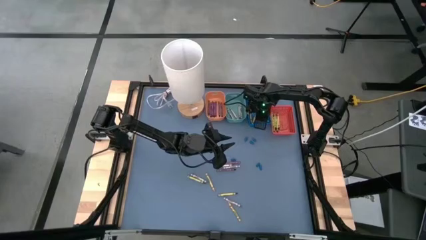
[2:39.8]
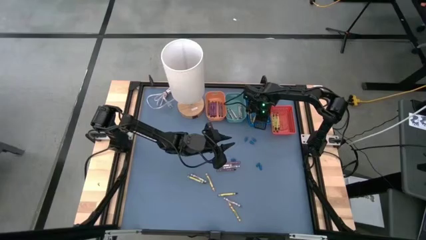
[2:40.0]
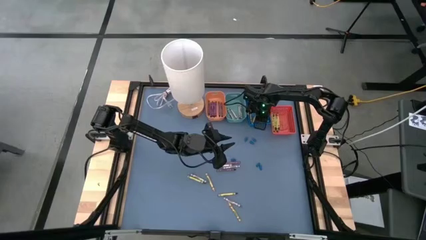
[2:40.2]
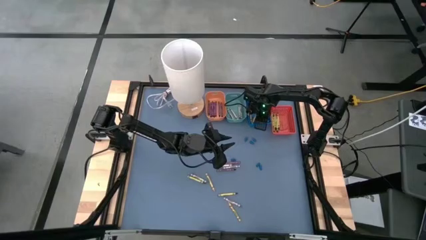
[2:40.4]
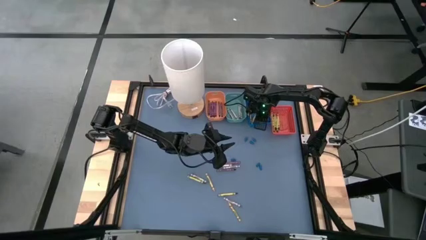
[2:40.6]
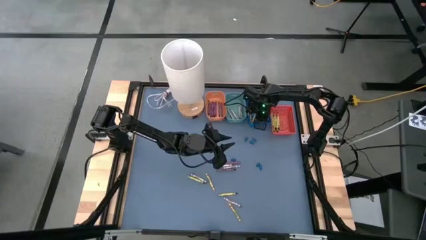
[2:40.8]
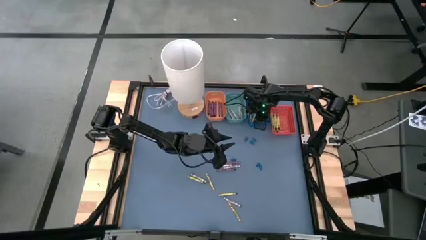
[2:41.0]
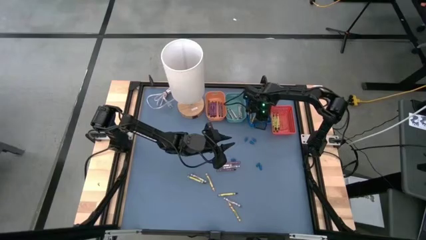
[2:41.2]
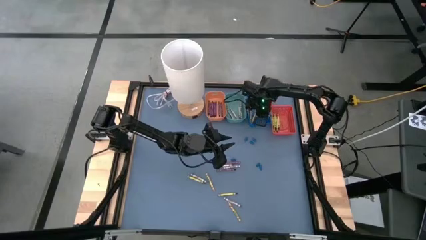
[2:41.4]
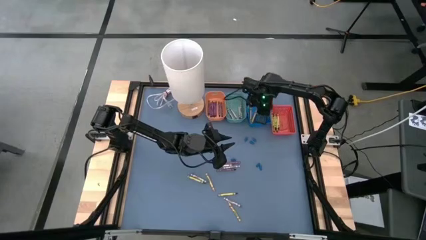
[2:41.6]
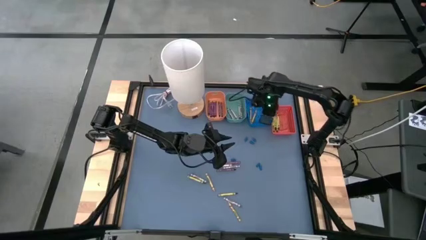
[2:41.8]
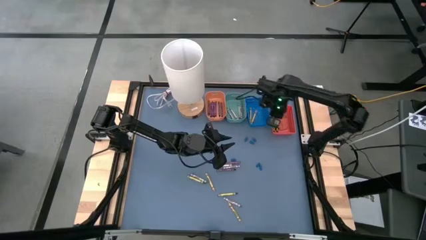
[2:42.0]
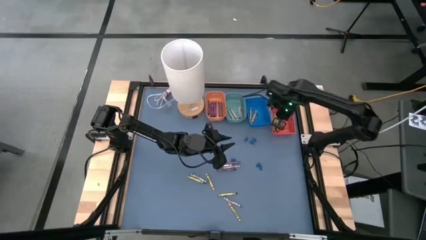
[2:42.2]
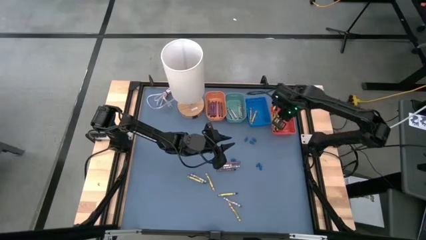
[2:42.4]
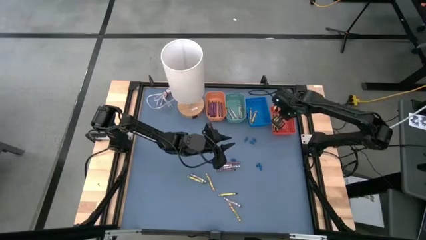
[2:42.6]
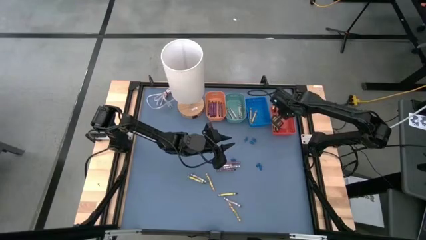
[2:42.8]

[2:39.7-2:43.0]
Task: Sort crayons
Put the green crayon from the blue bin to the orange bin

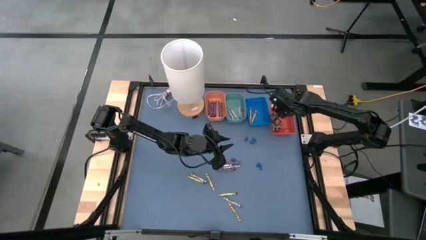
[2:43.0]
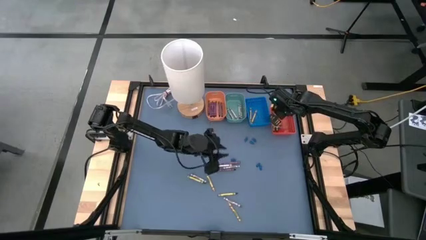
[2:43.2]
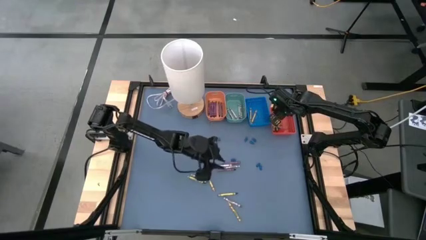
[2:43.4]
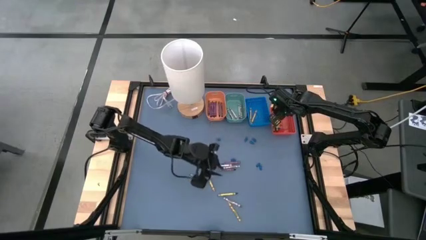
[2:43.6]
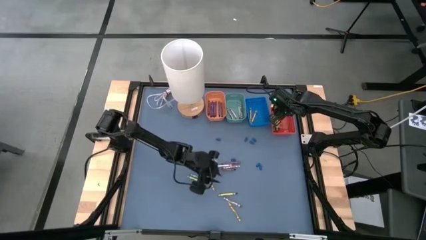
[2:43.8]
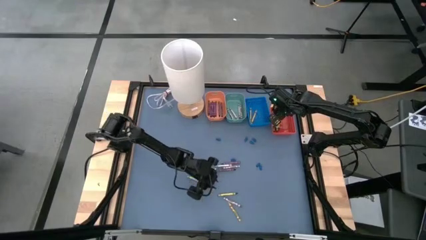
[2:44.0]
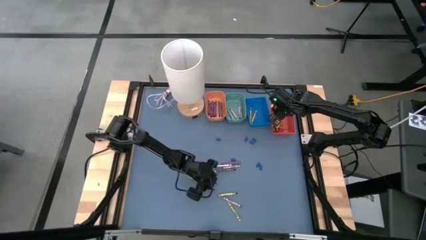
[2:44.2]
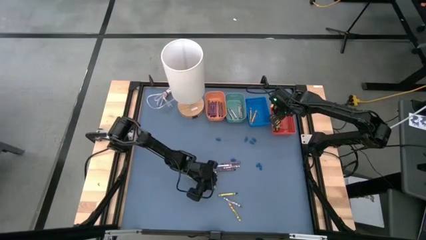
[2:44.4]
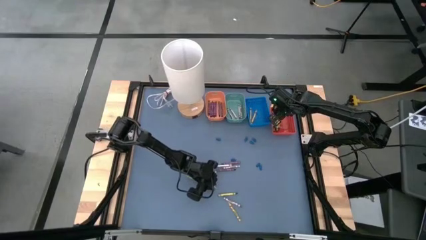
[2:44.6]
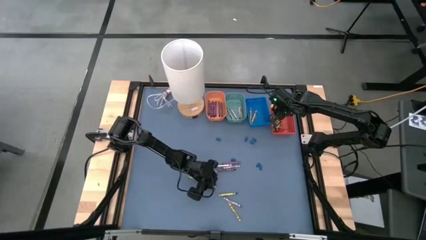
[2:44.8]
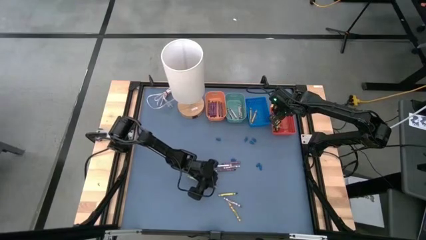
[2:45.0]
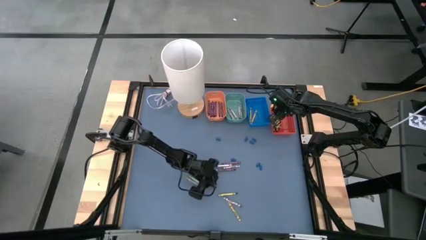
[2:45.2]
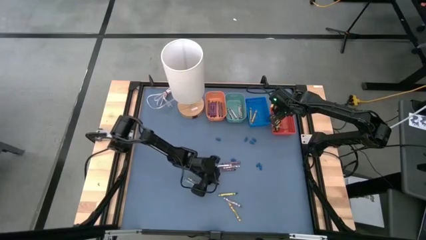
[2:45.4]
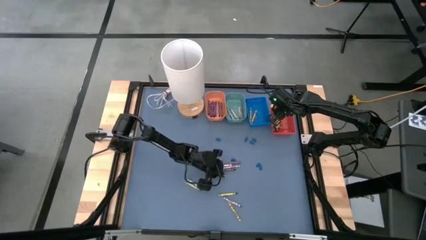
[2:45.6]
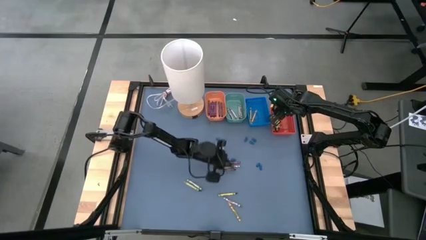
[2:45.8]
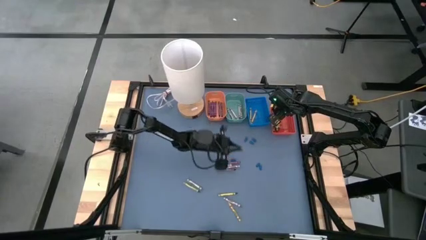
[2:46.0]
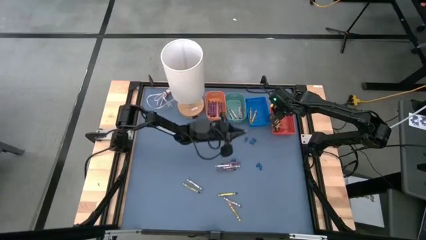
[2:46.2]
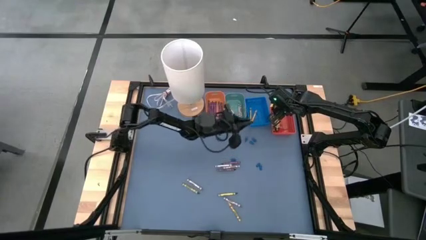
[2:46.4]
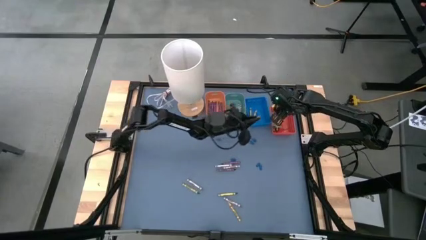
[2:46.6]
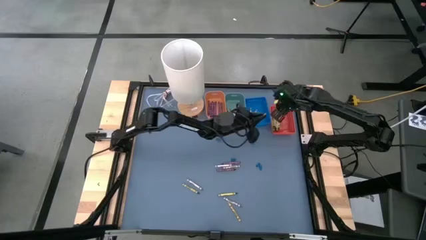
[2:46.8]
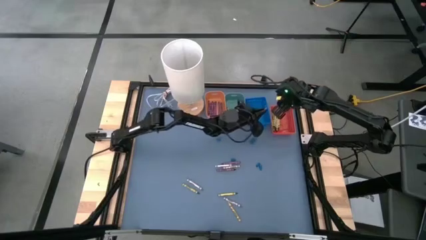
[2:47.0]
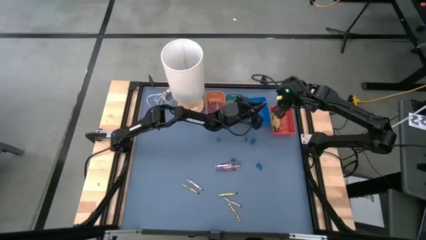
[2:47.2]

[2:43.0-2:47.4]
Put the yellow crayon into the blue bin

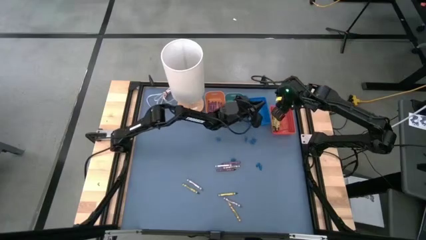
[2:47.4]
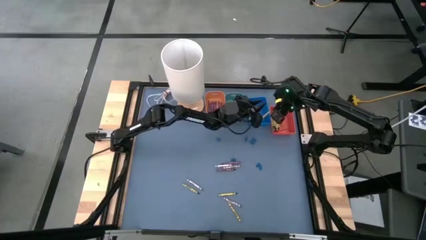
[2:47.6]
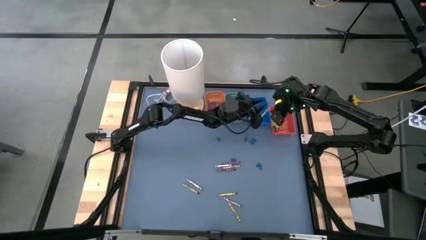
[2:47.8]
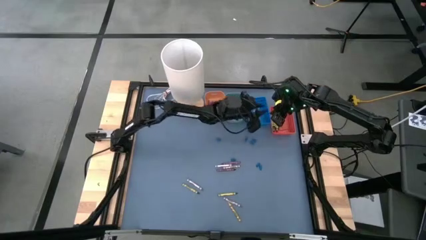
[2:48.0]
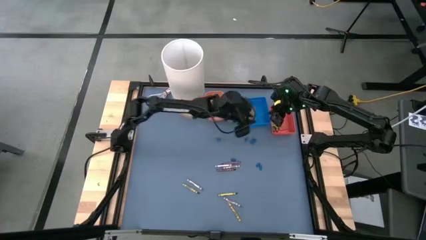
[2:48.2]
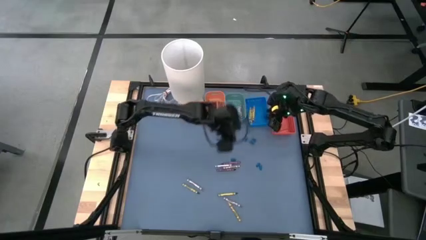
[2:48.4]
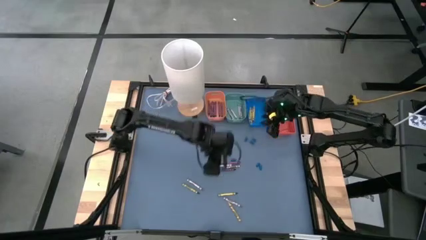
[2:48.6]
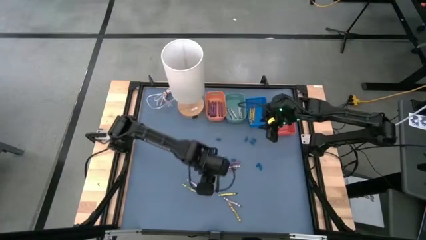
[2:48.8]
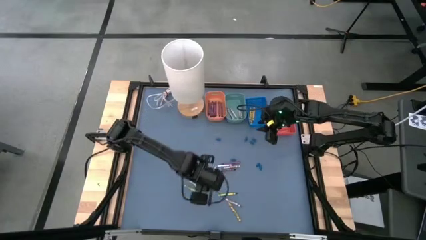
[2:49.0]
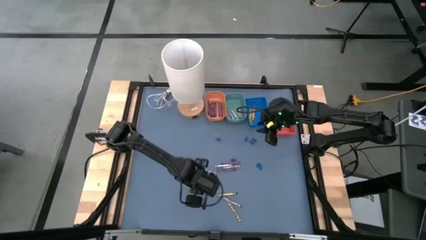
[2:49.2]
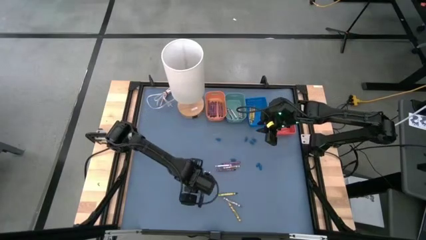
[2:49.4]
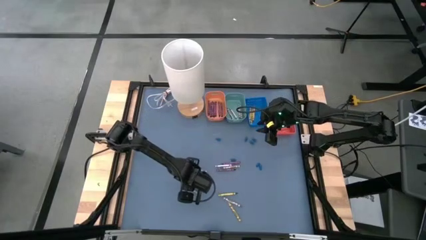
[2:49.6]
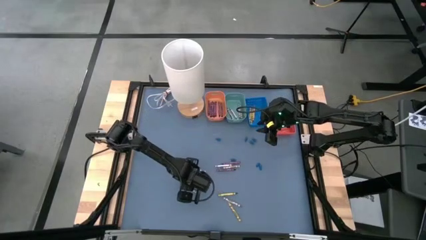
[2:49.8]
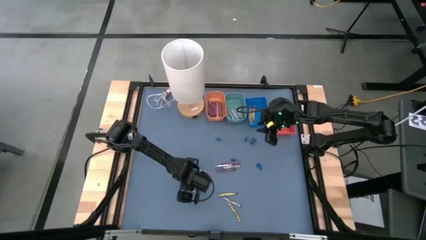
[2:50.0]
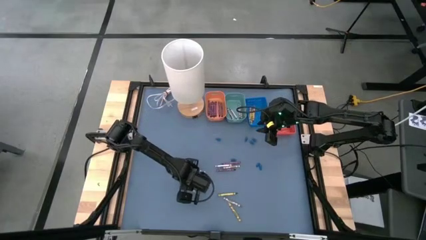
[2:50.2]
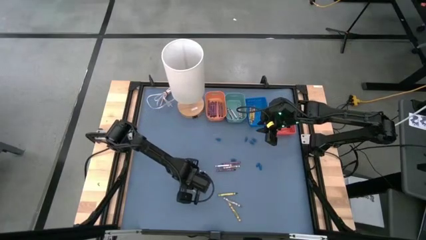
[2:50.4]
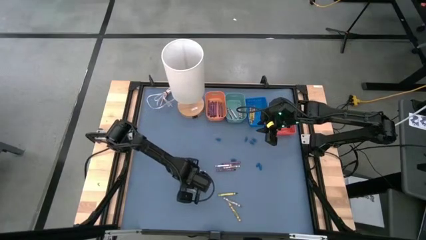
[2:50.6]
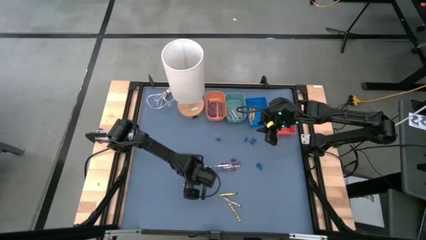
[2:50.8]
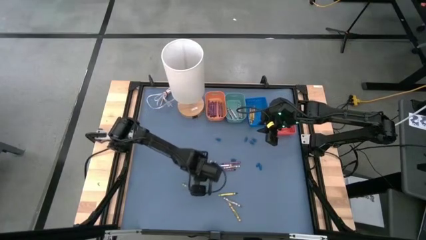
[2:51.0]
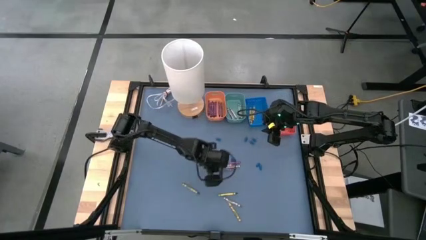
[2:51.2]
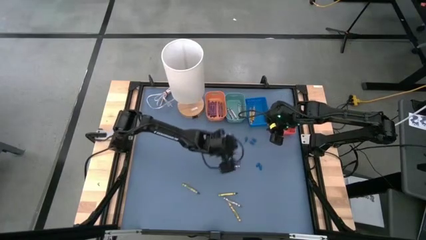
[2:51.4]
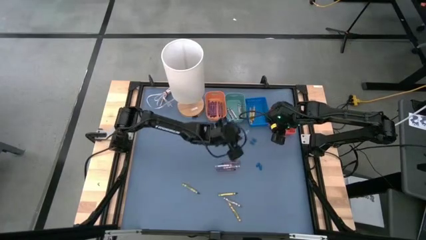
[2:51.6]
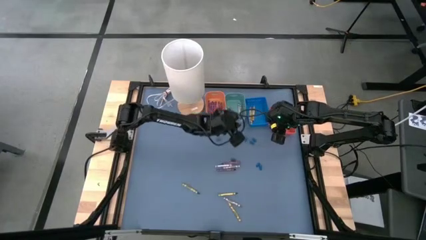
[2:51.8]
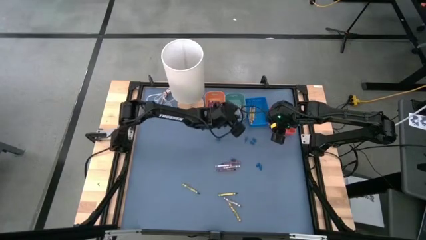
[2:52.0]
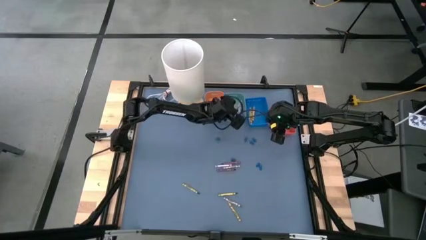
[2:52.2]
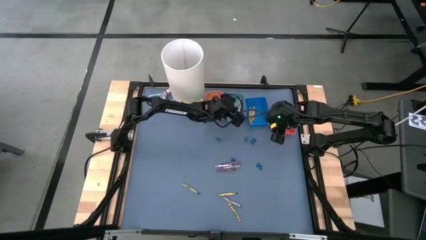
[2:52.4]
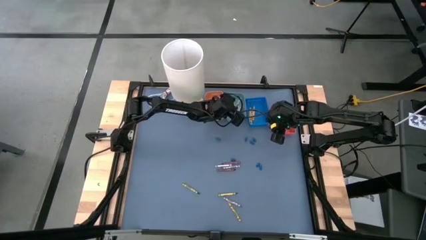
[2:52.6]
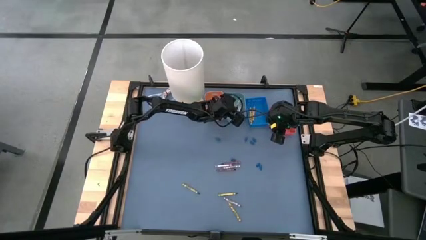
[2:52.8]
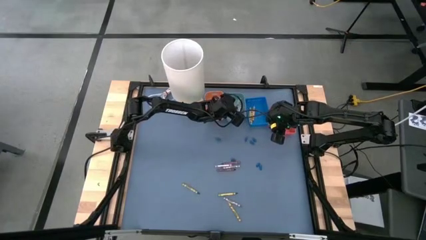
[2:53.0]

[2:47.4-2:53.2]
Put the gray crayon into the green bin

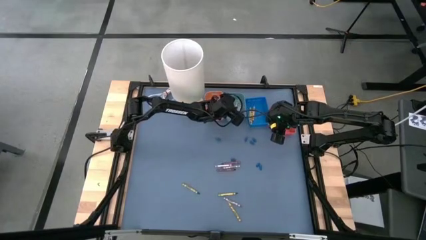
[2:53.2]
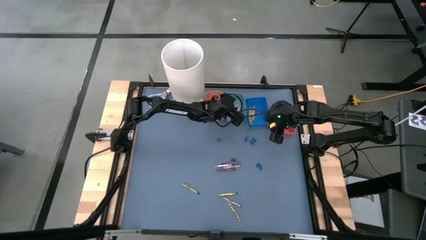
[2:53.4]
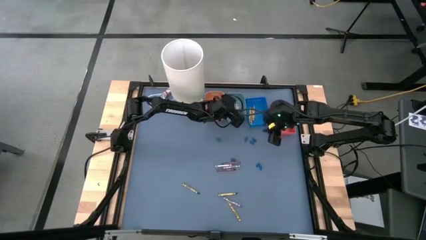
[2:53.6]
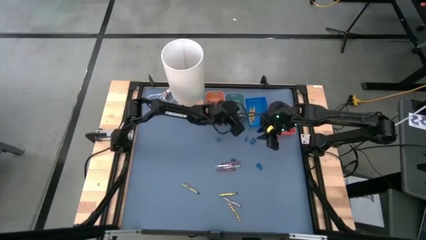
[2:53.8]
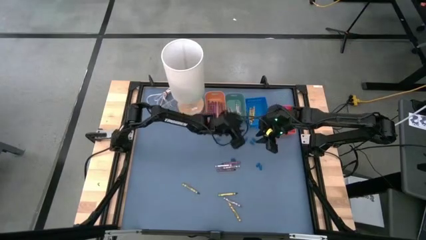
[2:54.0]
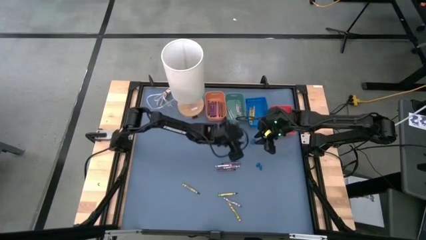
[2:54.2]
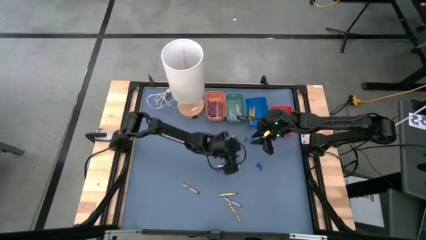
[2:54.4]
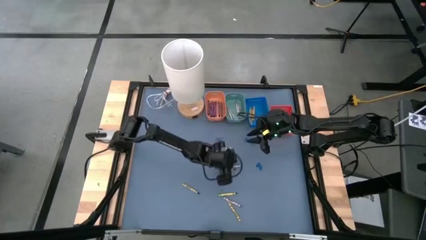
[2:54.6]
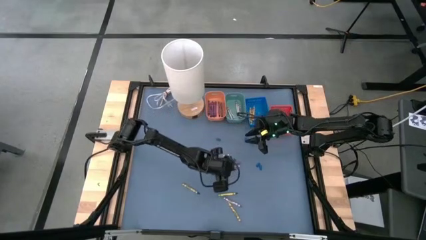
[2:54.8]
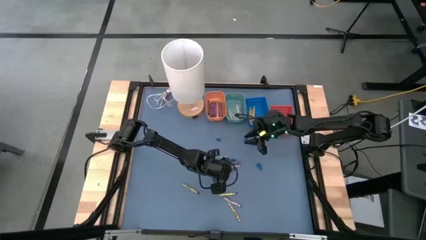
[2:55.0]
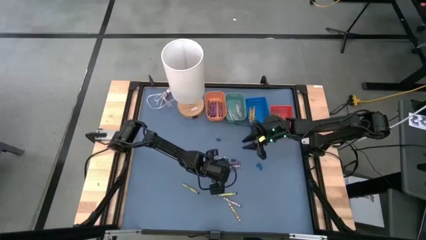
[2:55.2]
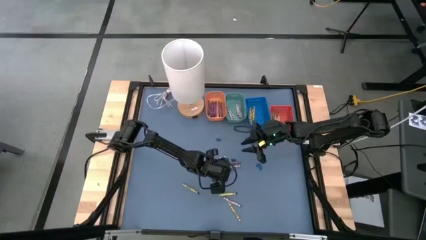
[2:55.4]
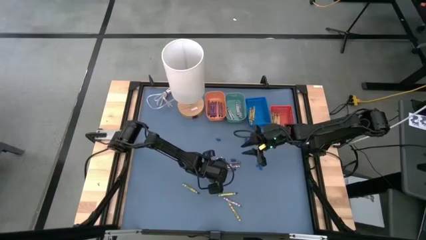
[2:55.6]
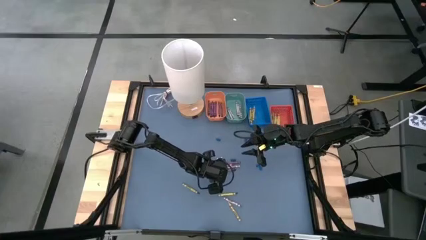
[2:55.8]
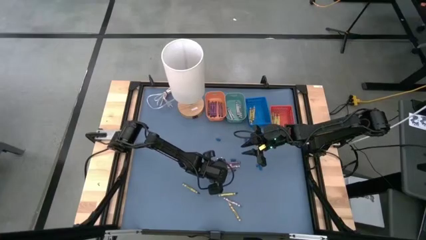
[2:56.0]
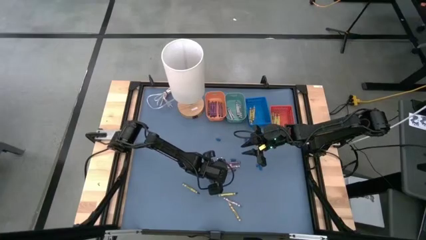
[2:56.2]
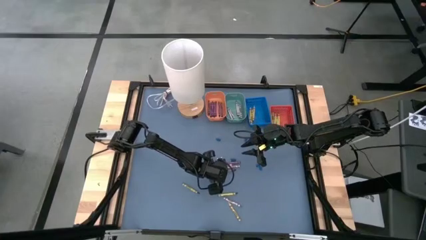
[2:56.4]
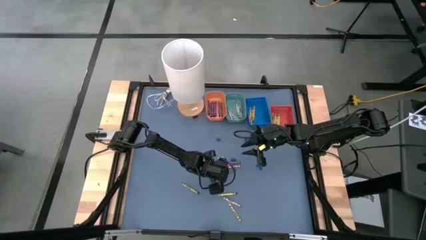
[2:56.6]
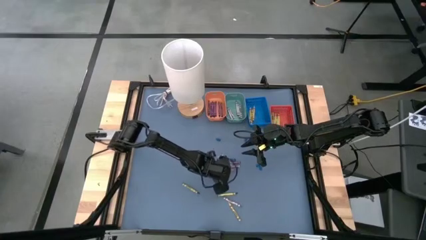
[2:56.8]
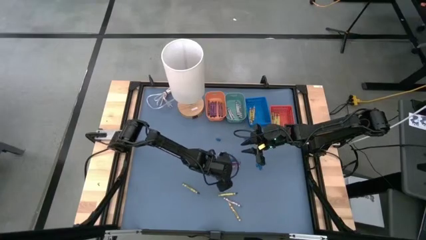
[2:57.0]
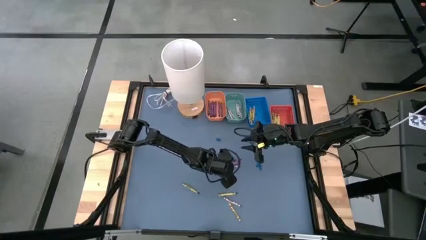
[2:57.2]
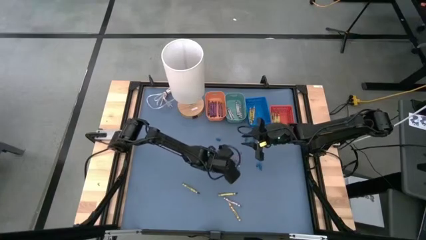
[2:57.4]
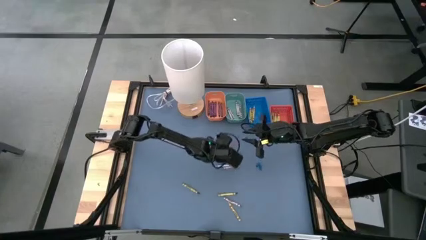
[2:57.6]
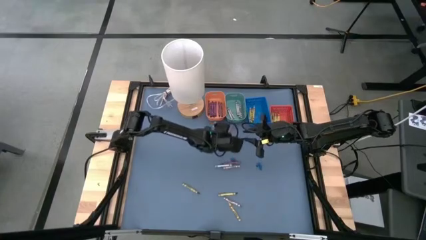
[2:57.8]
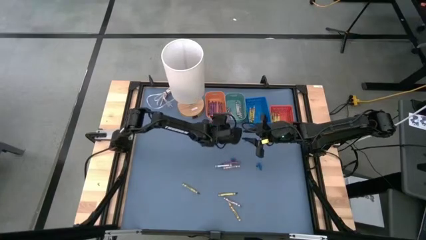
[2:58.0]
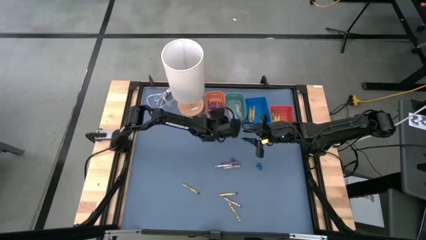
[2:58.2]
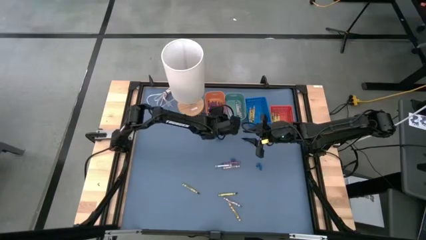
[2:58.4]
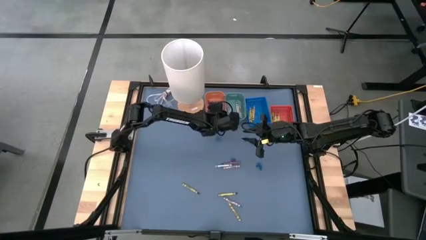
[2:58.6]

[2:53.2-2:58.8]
Put the purple crayon into the light orange bin
